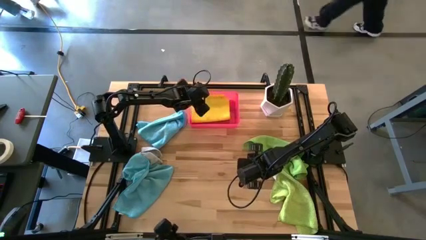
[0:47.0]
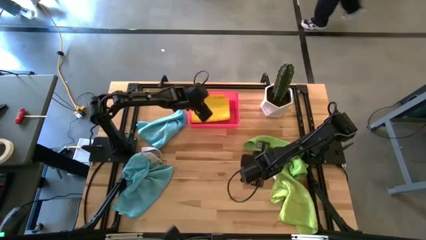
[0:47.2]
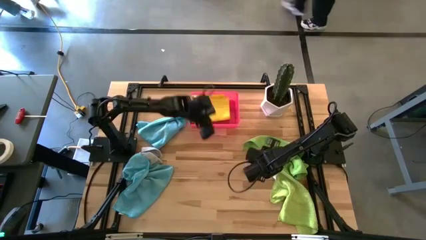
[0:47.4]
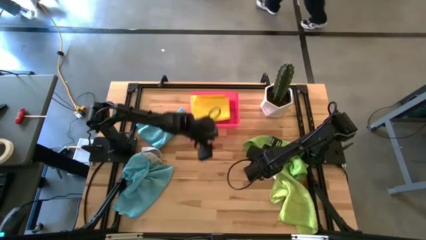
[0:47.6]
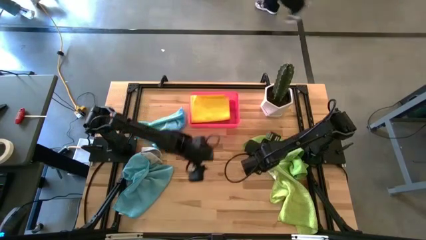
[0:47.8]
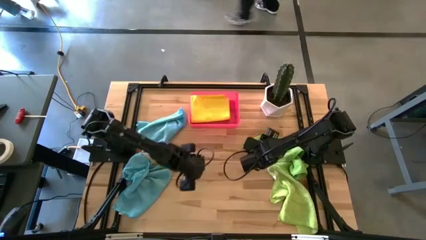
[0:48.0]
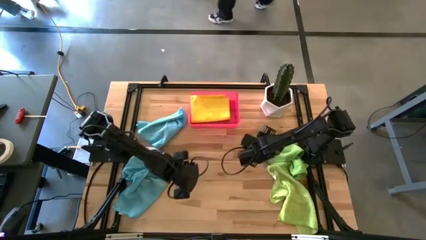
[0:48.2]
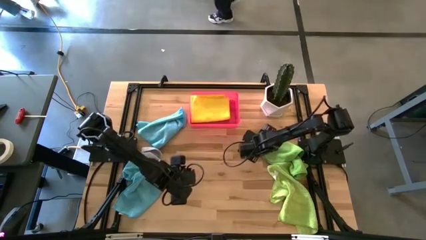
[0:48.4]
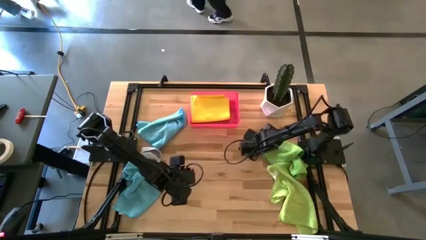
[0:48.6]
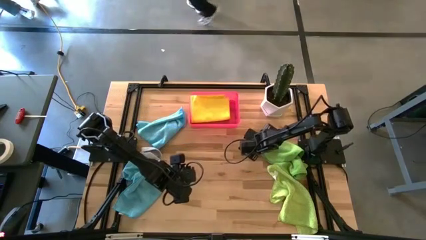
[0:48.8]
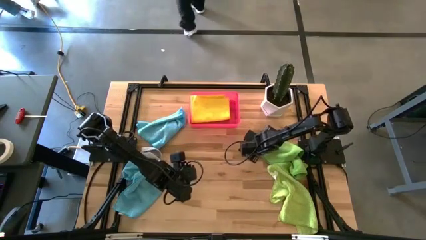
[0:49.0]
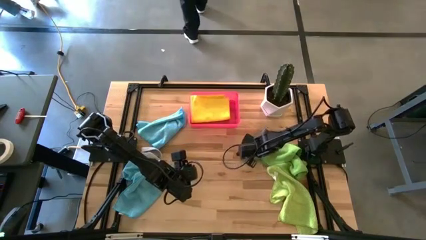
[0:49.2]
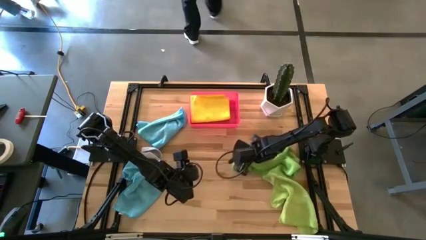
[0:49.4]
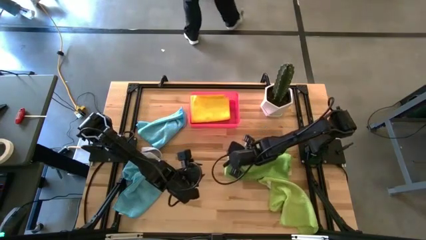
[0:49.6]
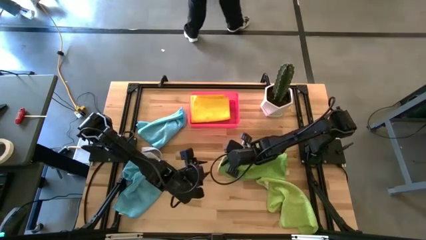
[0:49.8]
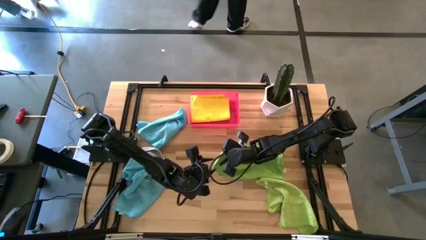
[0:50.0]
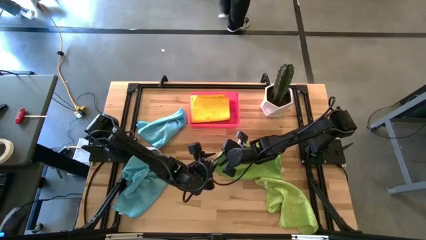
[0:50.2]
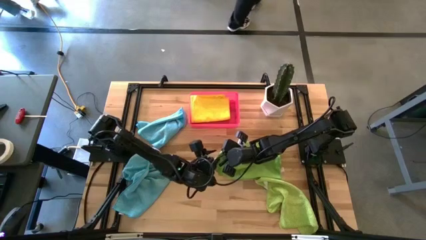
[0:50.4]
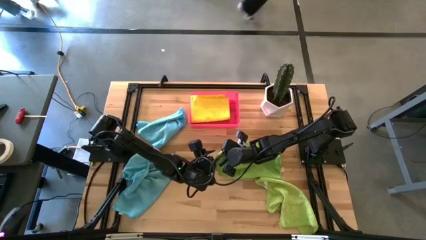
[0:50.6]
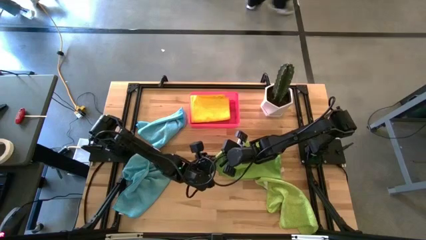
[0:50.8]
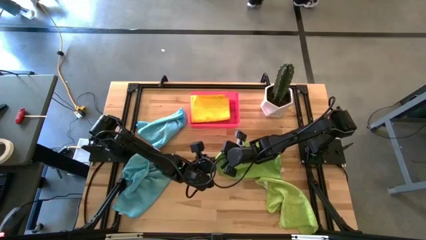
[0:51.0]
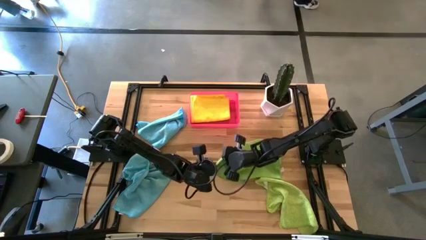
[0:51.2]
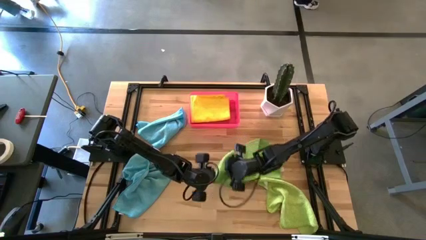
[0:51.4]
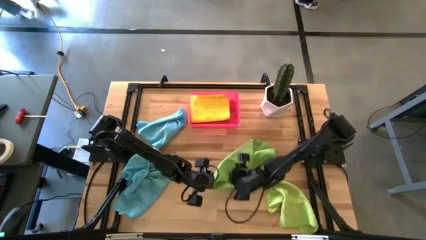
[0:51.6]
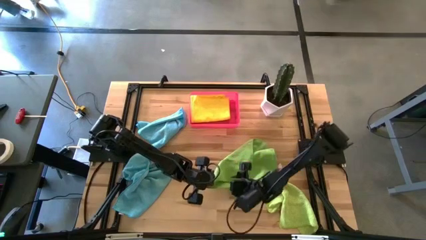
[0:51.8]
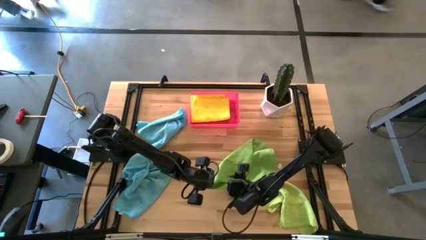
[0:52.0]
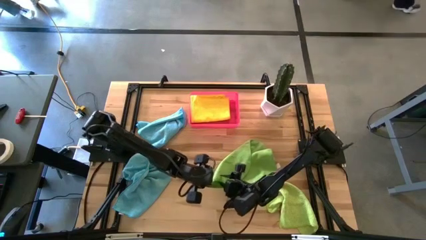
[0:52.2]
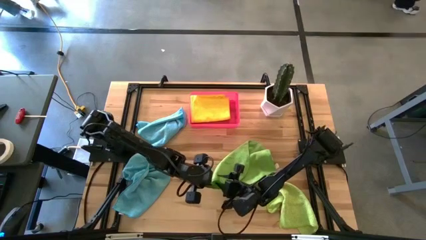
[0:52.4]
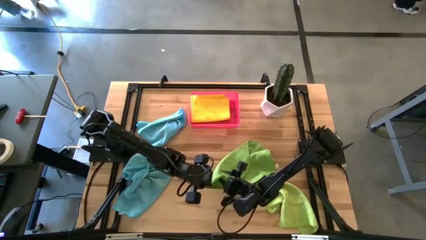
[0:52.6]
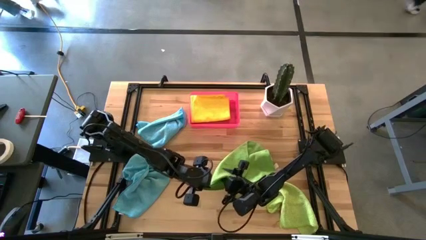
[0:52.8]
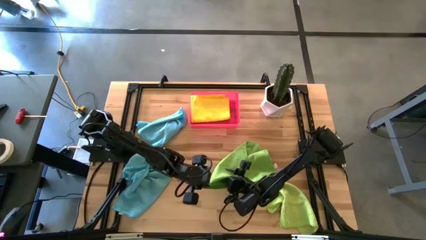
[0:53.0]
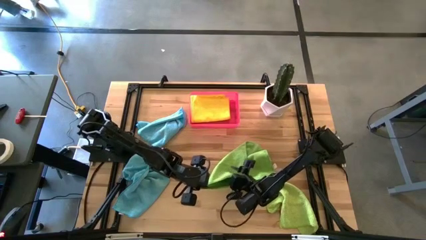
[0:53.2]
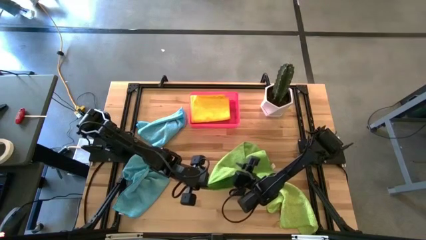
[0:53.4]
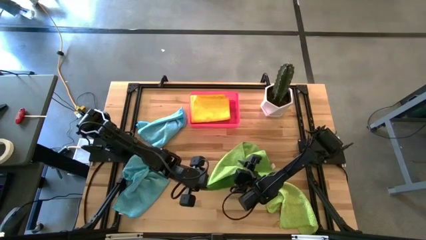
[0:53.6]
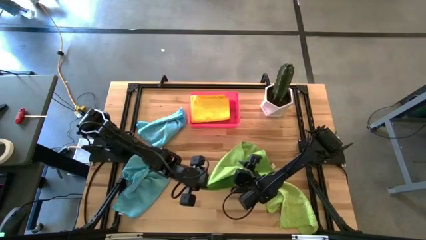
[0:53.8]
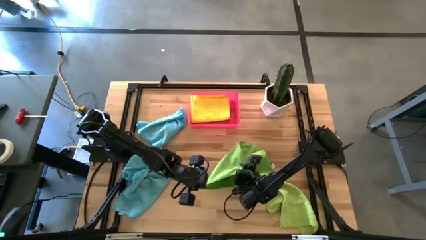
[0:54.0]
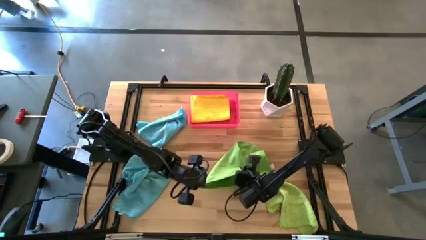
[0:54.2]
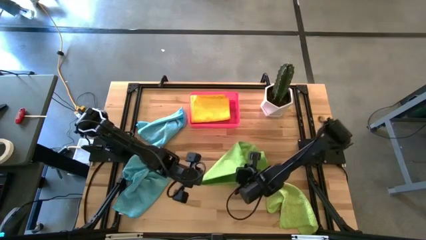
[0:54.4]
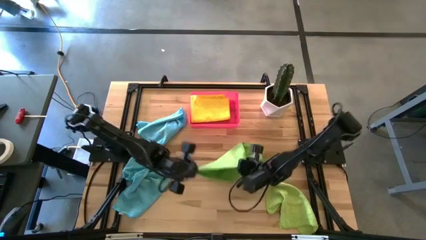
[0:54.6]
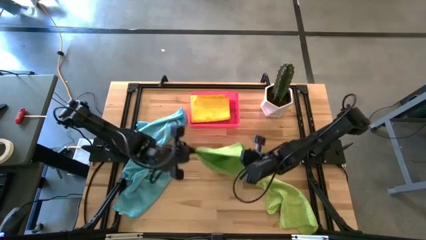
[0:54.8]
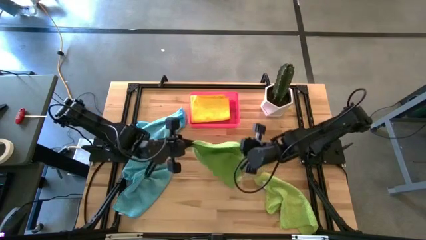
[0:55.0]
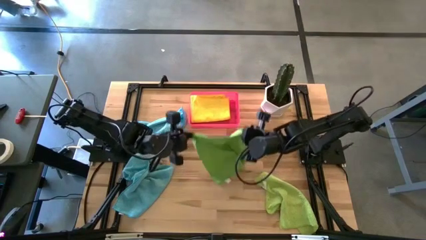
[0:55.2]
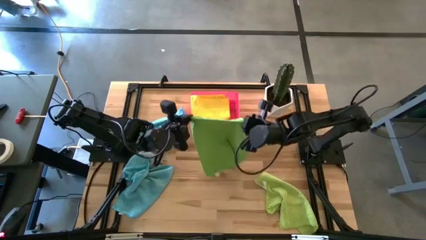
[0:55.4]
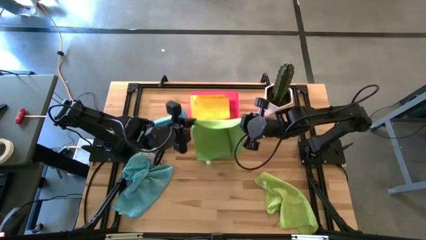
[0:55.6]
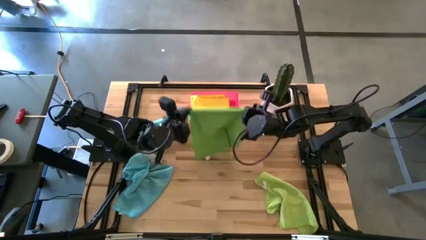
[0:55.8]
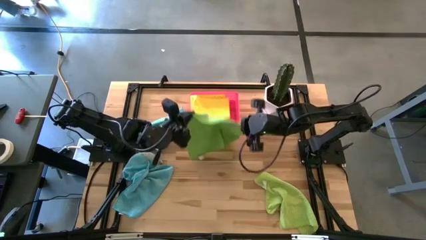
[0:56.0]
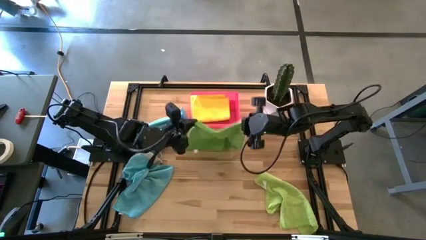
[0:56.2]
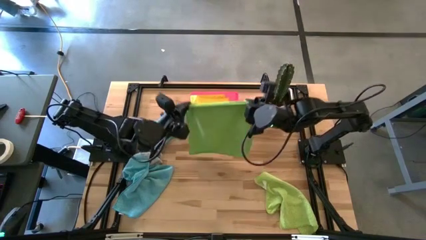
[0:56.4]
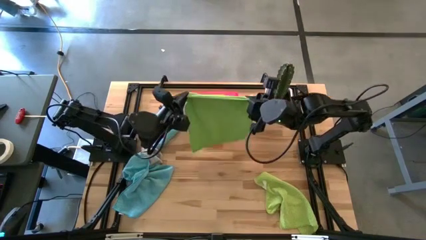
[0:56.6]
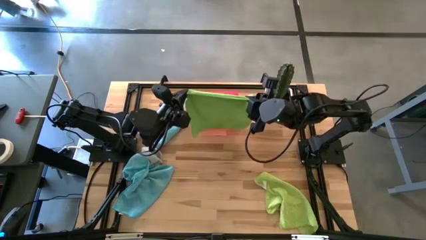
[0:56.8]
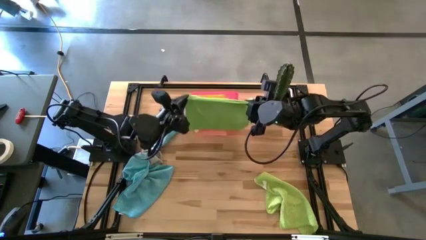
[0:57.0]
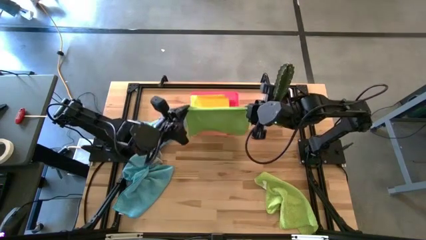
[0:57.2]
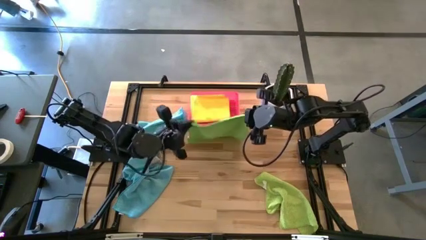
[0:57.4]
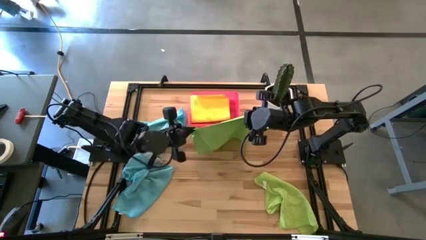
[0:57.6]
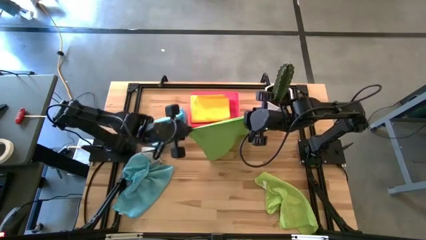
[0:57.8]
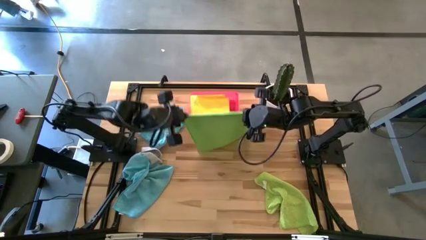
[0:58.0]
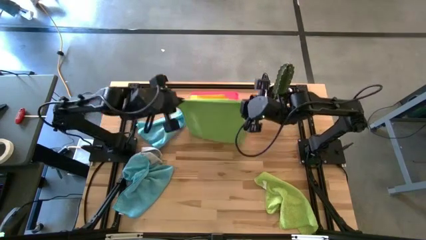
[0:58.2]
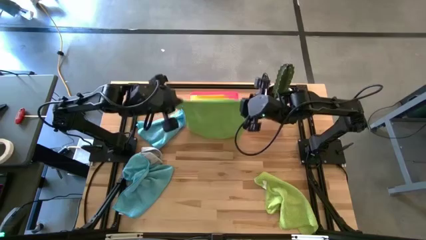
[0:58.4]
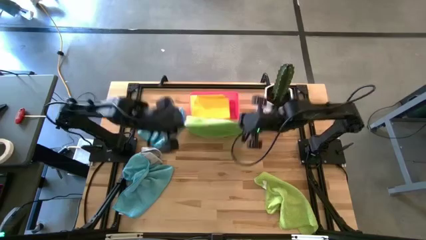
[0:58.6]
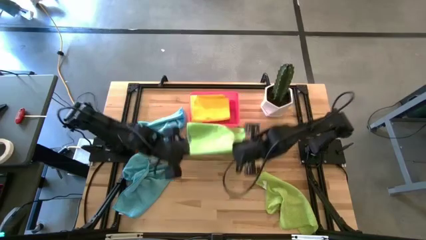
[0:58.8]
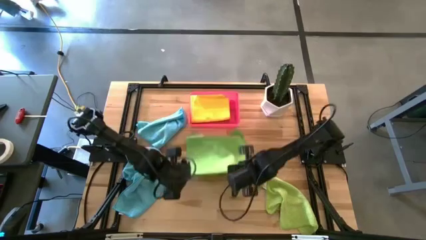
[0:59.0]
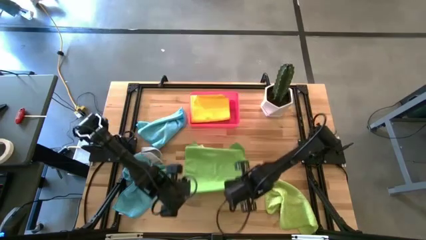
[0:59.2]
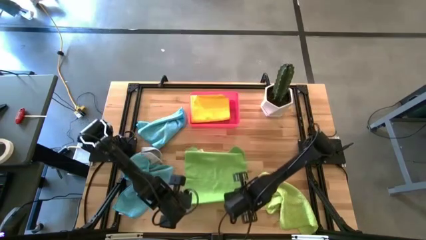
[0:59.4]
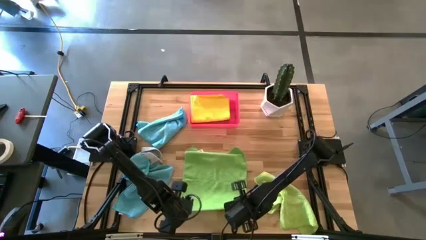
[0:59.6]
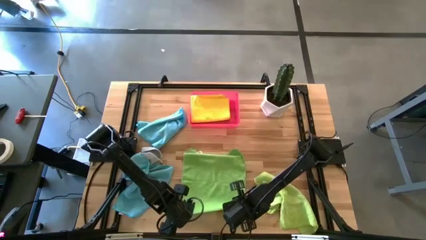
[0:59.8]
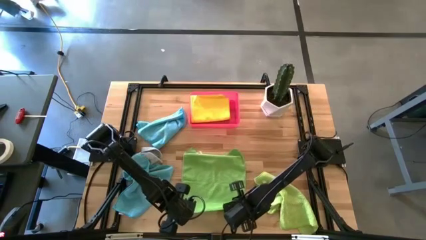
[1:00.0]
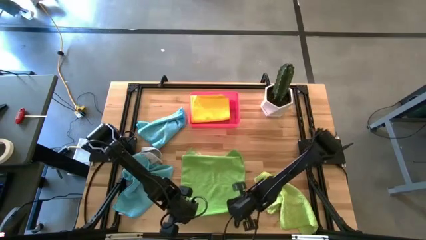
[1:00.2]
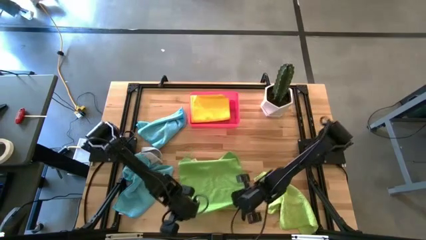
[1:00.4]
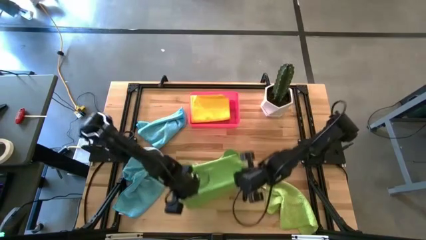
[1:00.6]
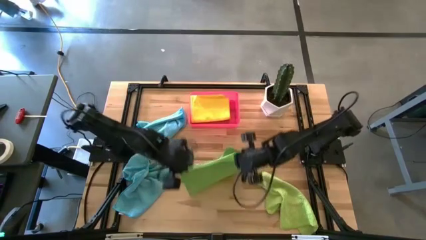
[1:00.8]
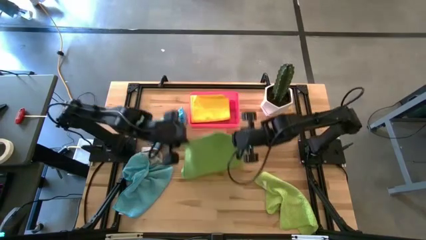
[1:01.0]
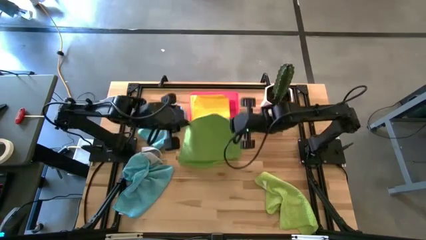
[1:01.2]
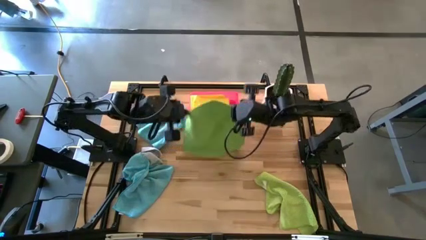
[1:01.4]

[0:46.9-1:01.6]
Task: Fold microfiber towels
Fold the green microfiber cloth

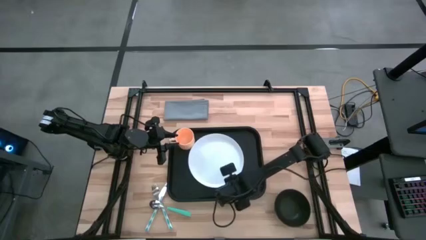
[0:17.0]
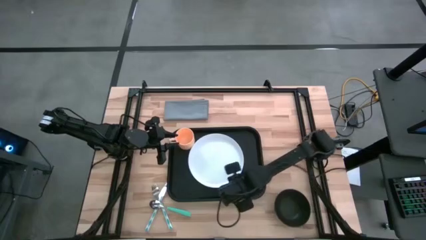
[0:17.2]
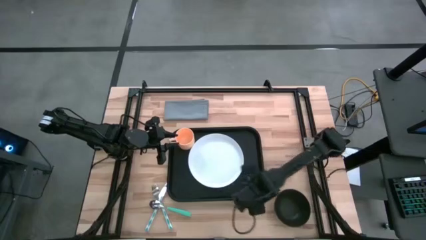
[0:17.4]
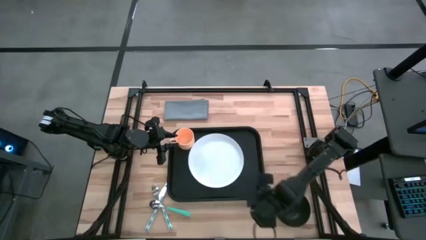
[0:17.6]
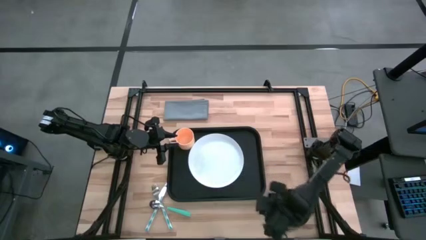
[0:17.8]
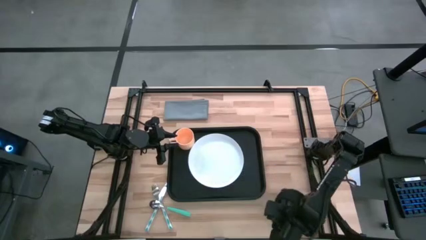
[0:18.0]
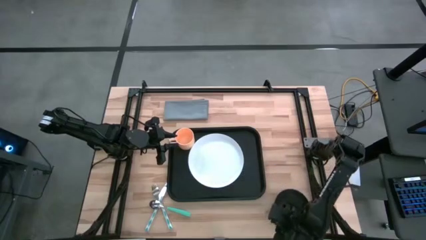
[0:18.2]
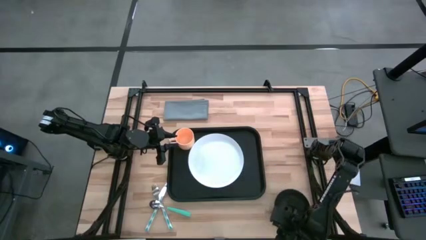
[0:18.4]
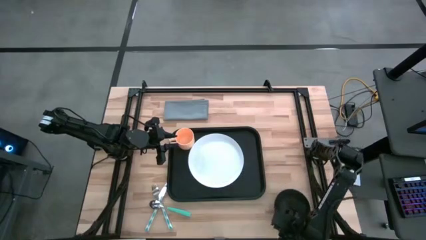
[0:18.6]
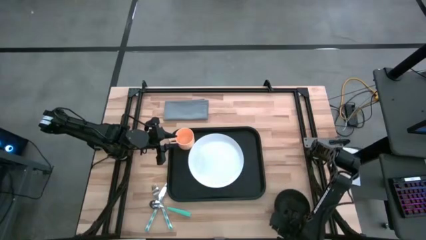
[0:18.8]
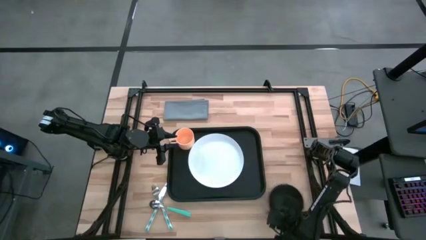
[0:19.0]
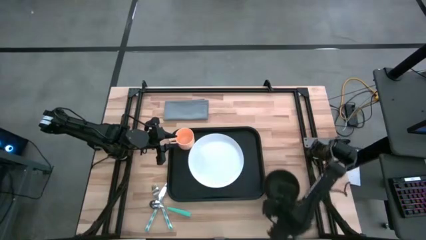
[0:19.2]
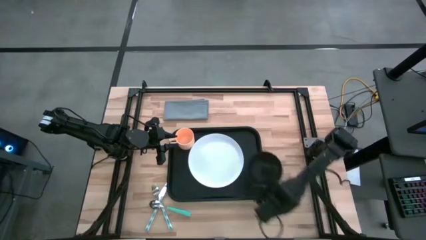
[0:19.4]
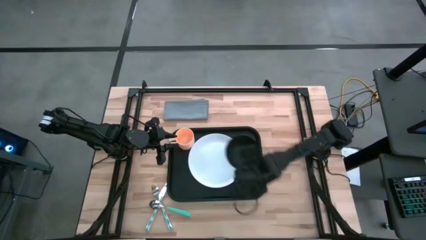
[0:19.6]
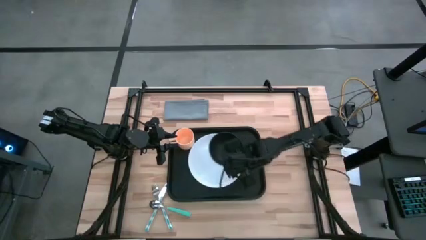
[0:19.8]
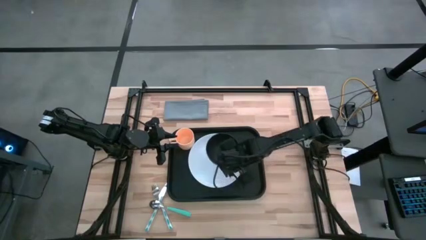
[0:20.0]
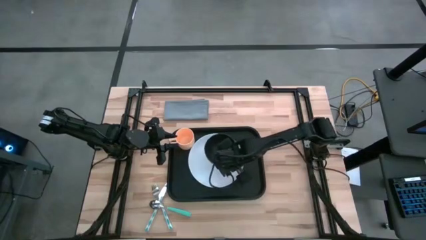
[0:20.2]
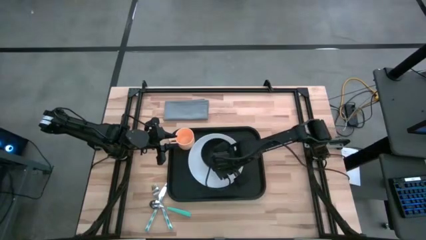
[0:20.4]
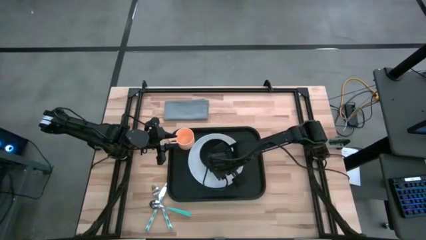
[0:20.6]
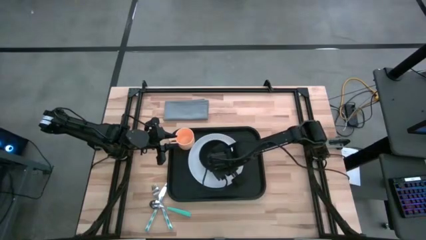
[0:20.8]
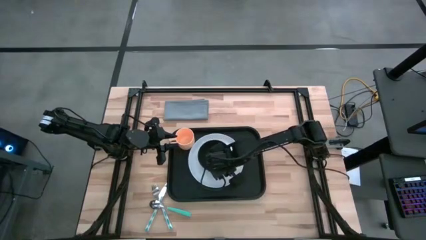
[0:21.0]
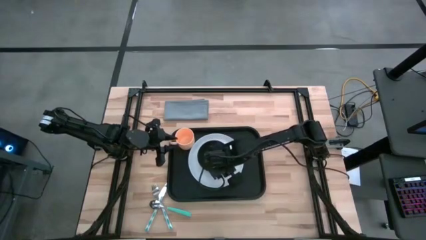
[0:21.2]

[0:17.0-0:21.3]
Task: Set up tray
Put the black bowl on top of the white plate on the black serving tray
